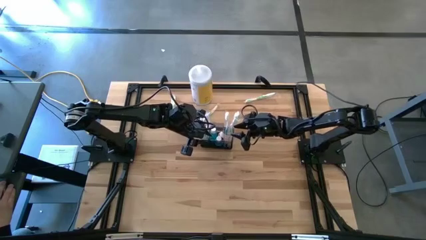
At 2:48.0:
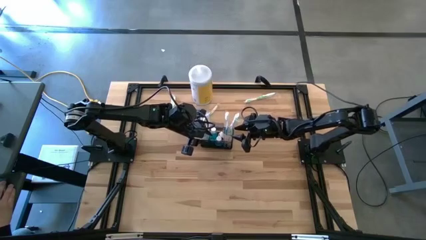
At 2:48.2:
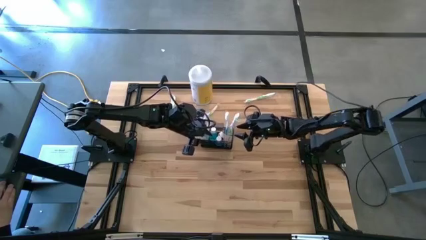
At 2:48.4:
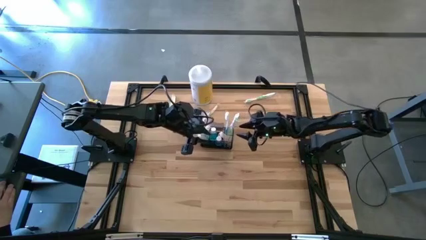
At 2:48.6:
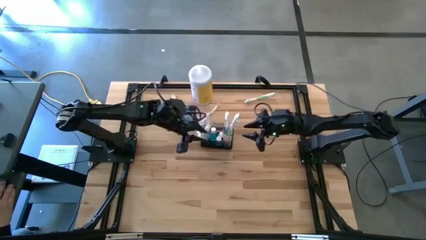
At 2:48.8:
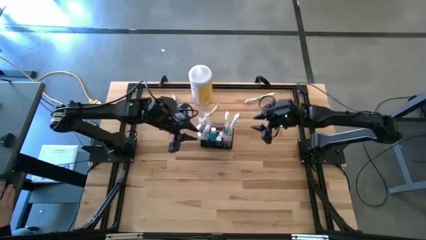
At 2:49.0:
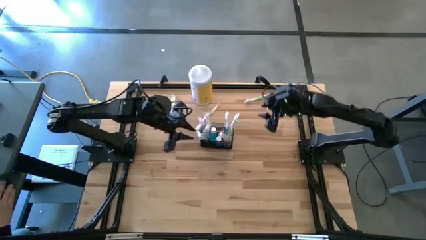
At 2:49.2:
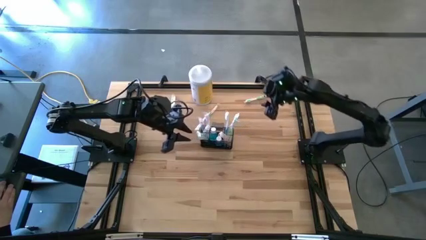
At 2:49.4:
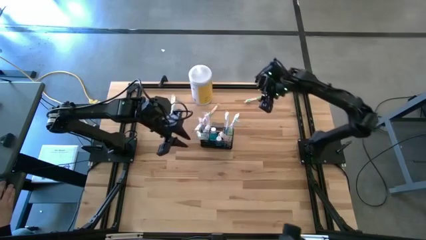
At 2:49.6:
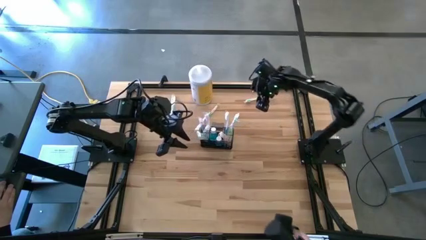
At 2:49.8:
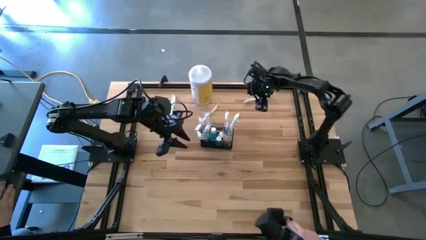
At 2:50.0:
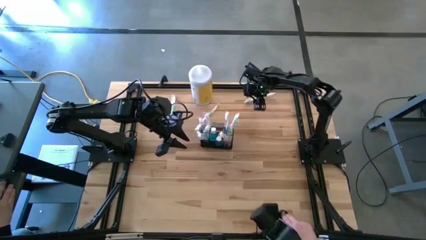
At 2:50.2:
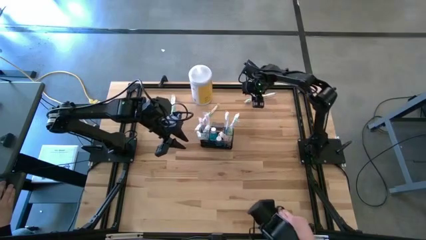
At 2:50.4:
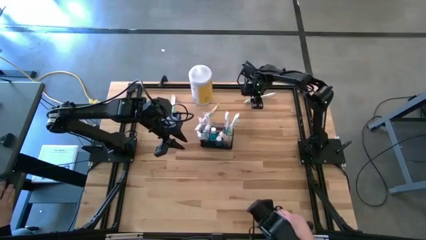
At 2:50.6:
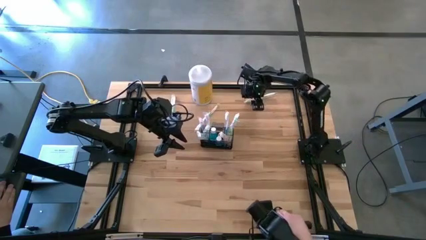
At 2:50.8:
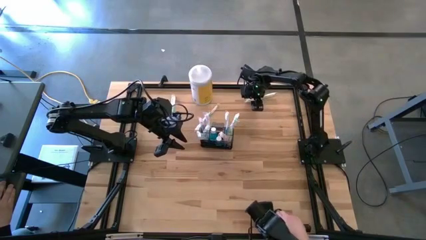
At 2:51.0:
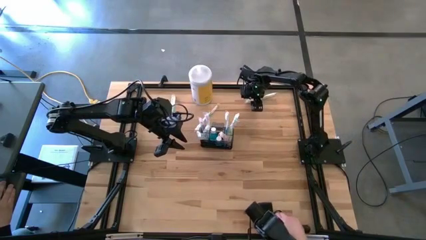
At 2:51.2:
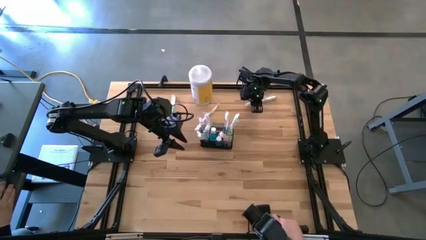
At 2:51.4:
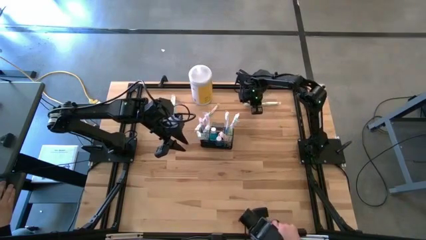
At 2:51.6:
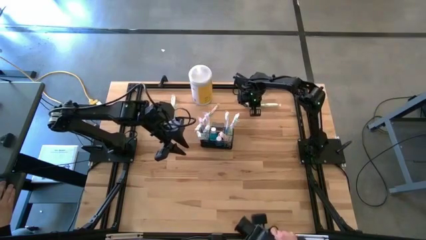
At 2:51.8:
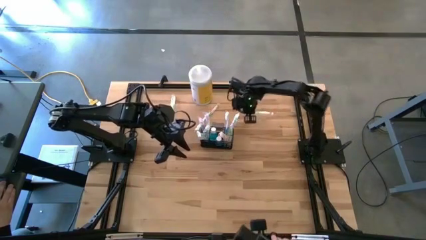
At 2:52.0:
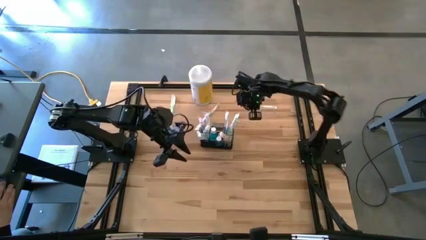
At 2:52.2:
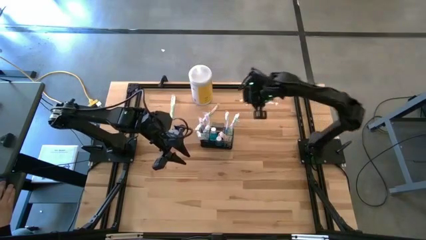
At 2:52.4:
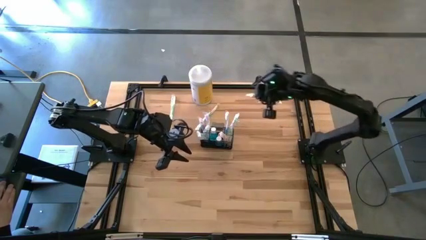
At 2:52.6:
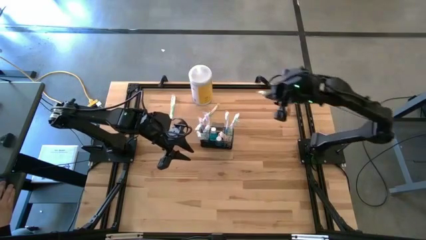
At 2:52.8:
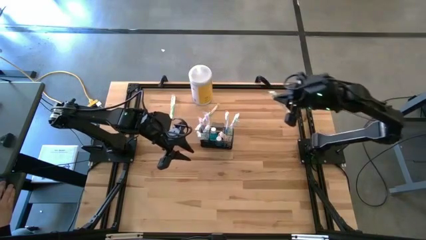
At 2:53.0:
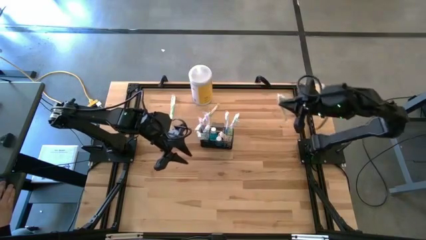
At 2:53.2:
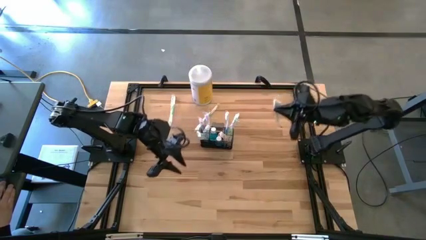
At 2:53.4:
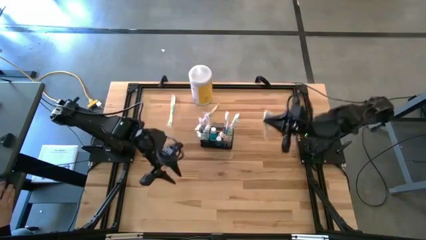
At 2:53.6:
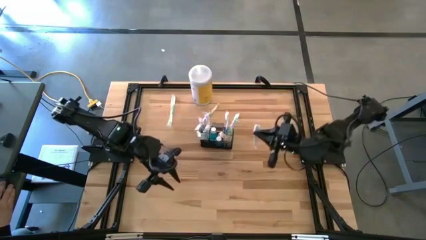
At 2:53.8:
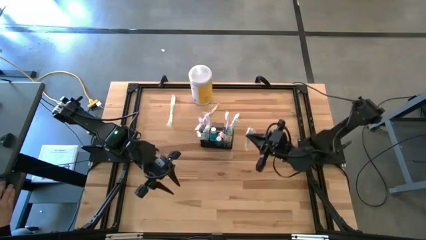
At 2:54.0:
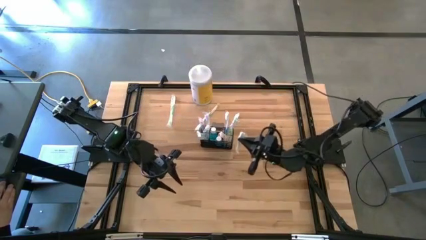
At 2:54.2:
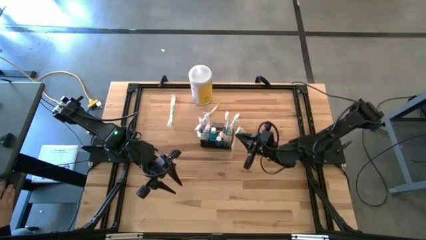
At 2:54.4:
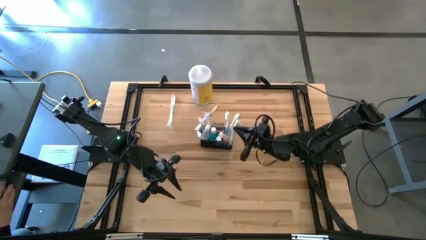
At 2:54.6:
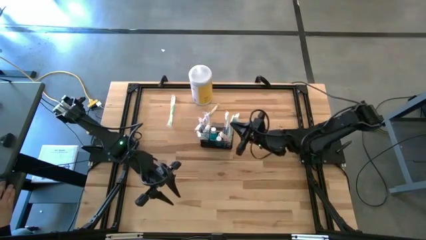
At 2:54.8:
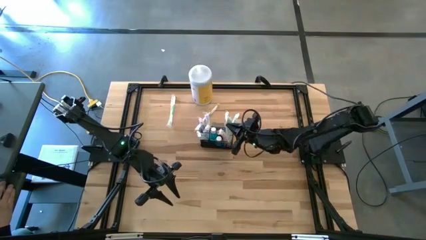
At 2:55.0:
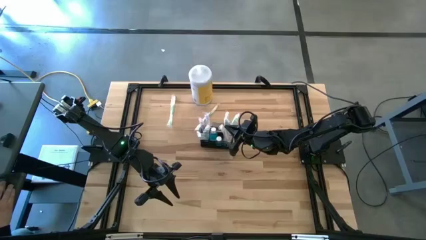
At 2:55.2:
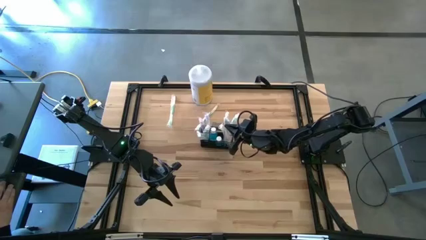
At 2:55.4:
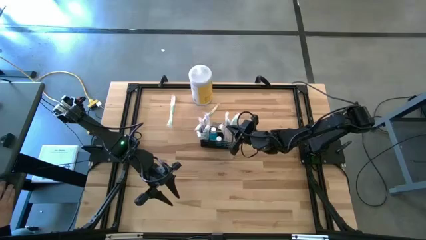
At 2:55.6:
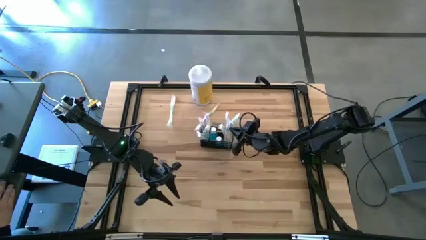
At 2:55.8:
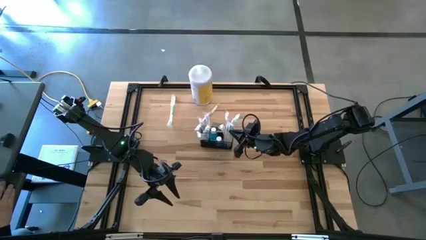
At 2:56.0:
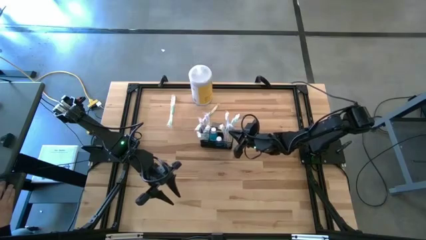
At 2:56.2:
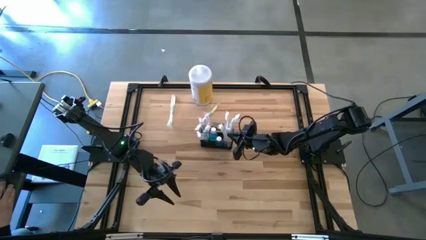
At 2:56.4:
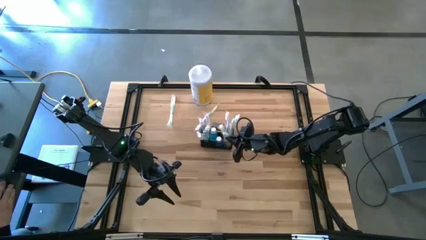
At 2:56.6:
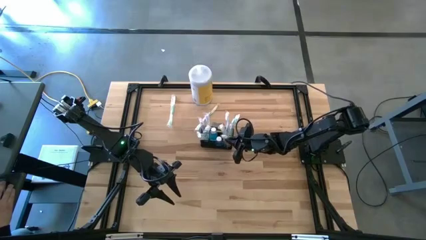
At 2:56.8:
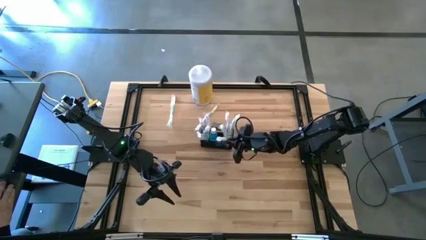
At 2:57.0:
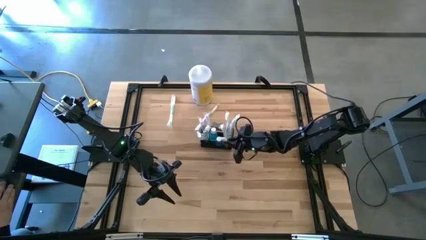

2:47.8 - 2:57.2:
Task: Pick & Place toothbrushing station
Put the right green toothbrush into the right section wire organizer

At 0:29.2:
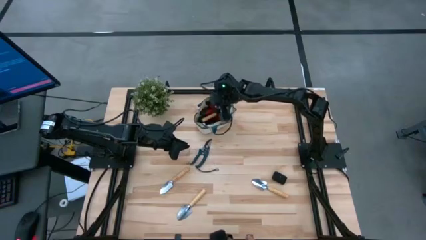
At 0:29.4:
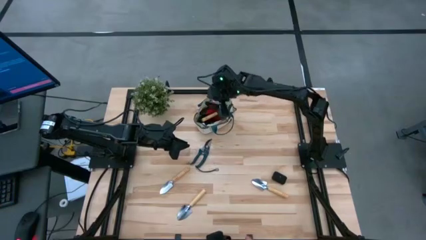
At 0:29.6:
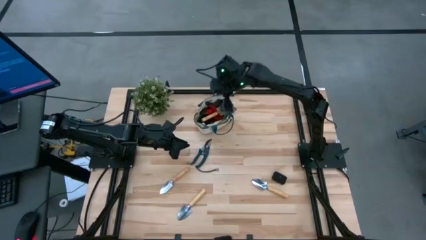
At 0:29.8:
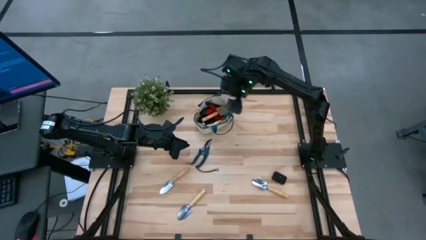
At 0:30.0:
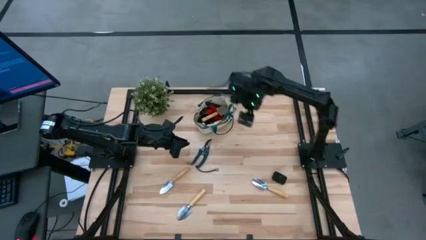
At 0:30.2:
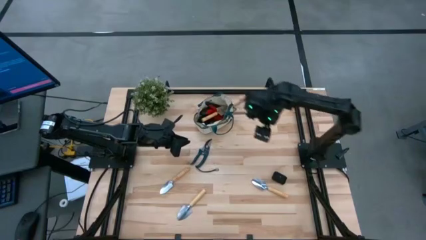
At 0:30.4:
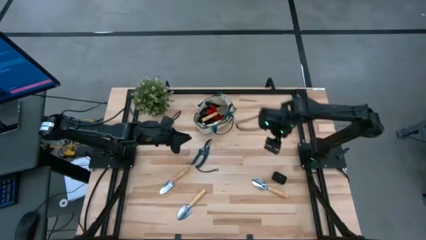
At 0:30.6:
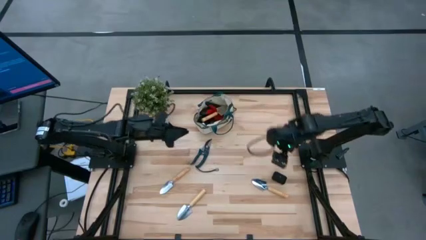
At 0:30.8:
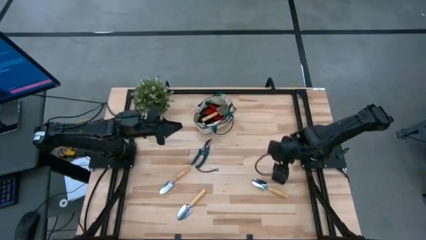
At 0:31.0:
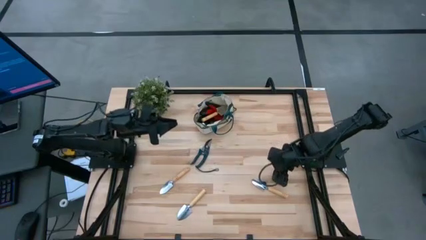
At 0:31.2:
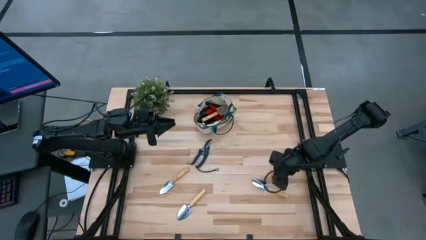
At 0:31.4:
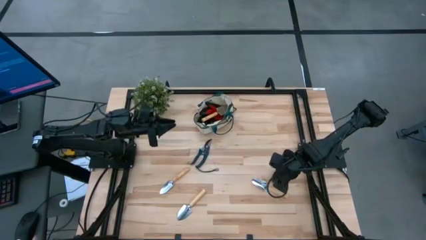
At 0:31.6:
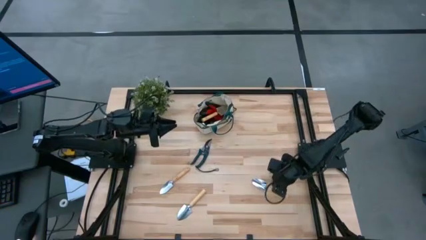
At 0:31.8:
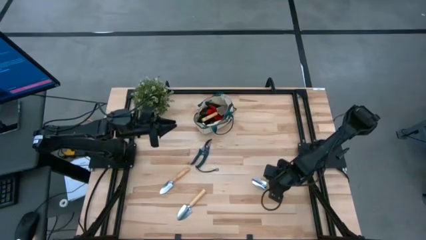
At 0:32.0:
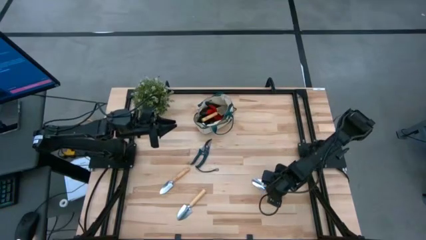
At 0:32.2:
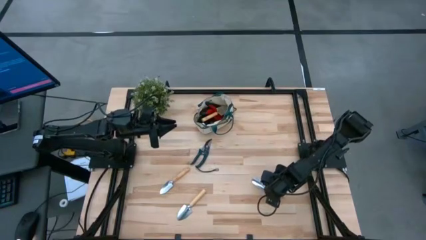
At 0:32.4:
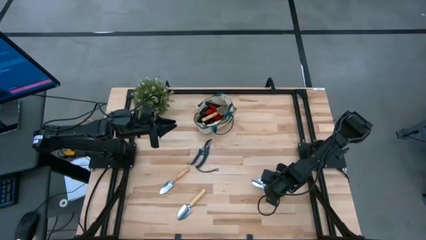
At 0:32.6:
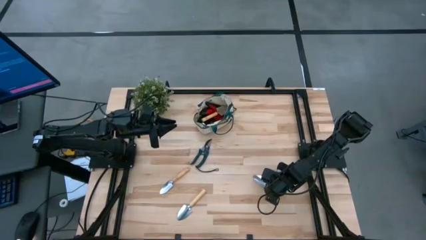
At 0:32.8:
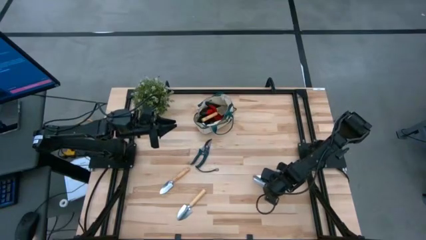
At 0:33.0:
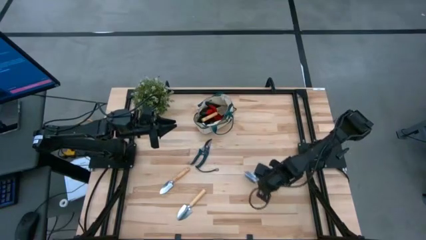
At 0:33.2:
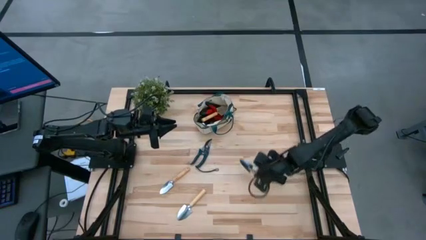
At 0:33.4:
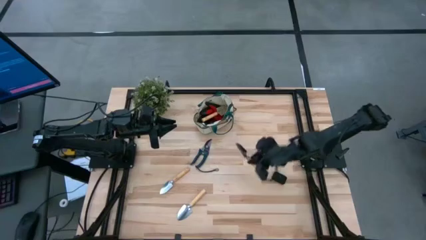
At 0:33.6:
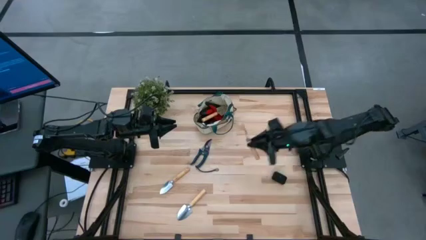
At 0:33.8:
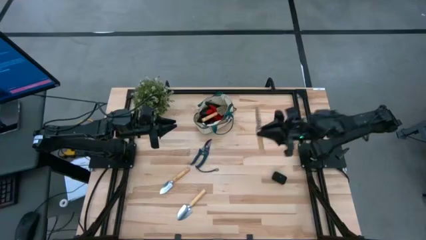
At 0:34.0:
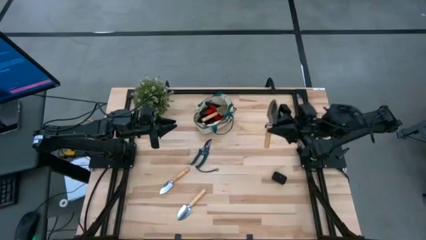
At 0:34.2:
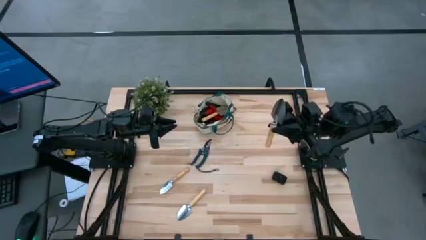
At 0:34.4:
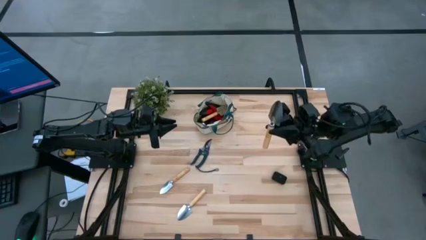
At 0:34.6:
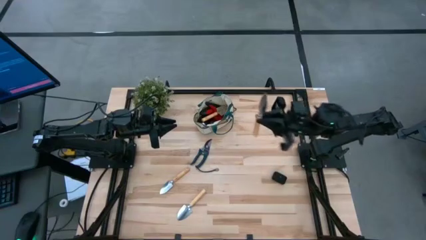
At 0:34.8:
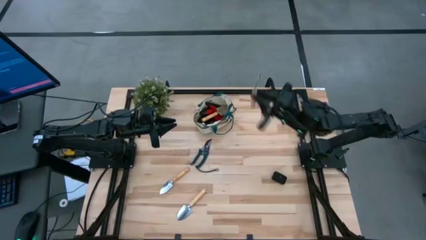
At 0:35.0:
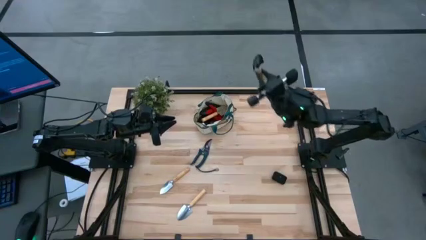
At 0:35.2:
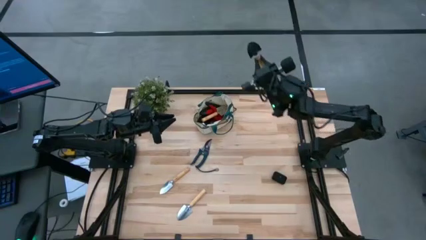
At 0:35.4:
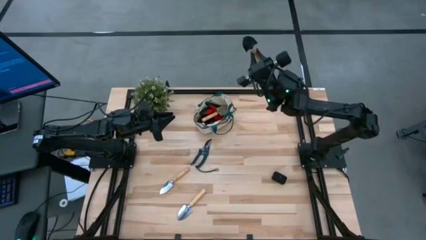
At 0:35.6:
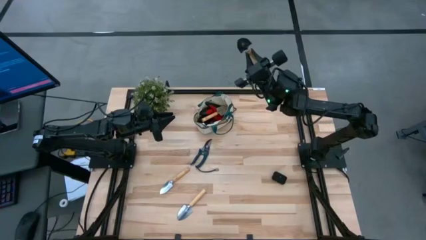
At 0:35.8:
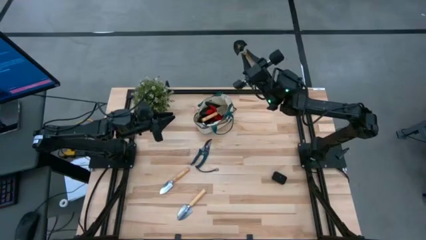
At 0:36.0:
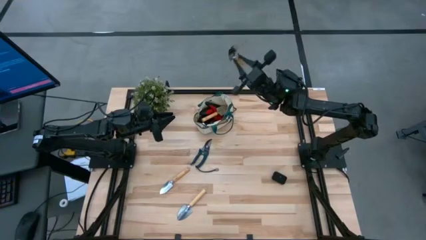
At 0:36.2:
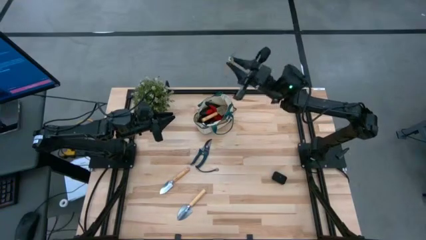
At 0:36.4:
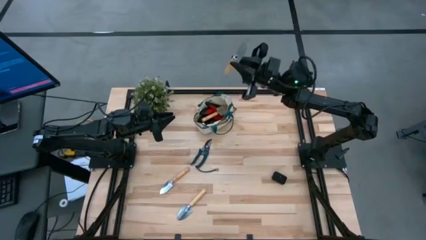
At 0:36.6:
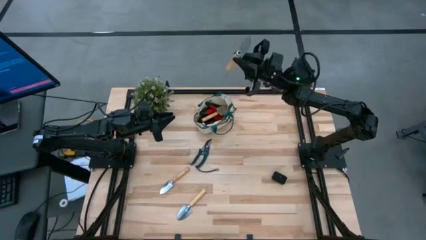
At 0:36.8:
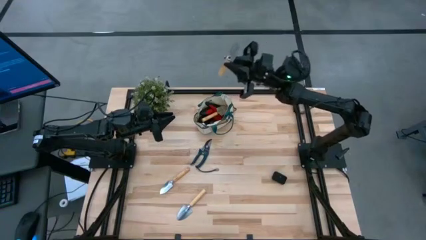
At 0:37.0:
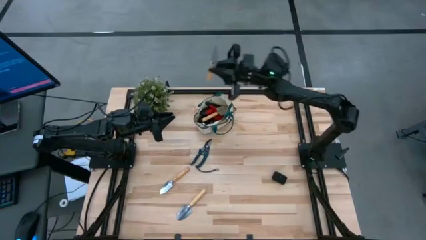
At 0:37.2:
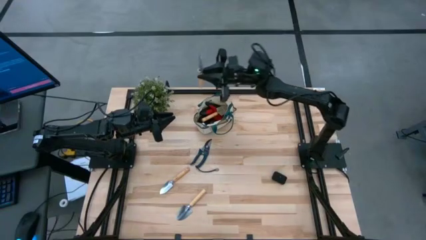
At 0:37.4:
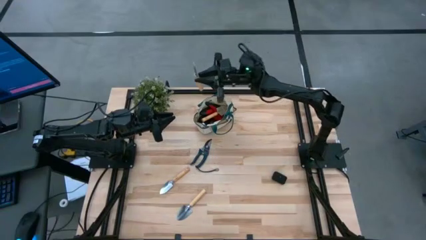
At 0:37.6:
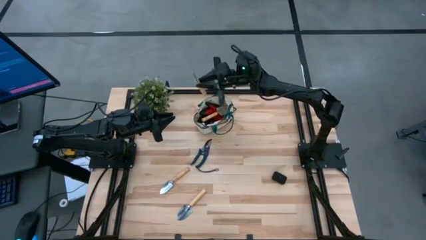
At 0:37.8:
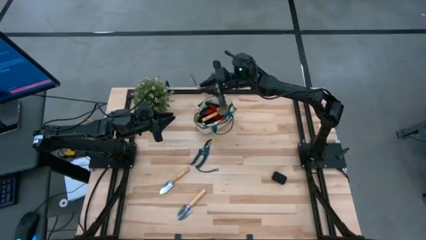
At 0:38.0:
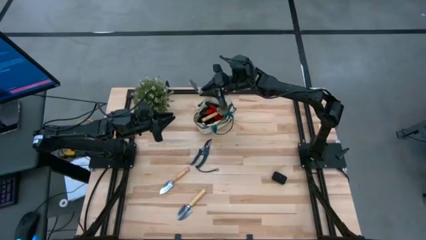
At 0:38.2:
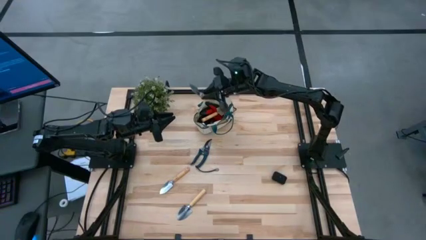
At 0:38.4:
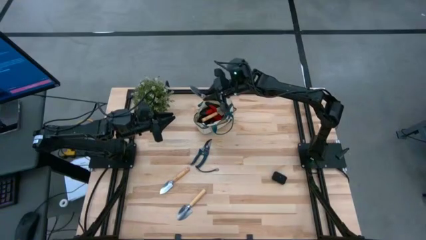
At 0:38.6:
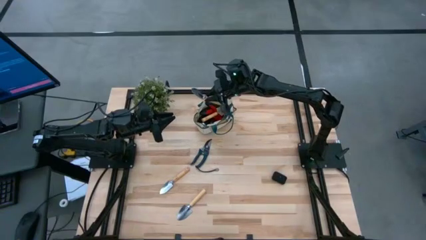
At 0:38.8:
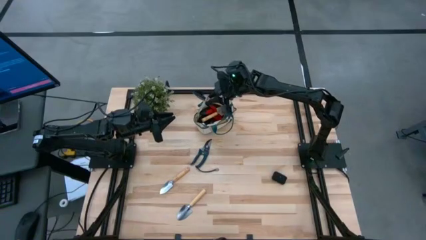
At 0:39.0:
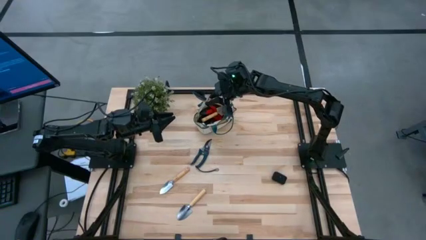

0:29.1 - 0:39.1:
Task: Pick & Place Garden tools in Gardening bag
Put the brown trowel into the light brown gardening bag
